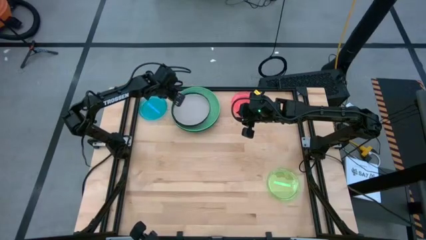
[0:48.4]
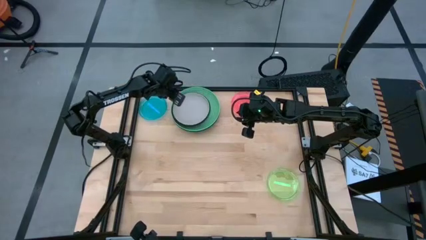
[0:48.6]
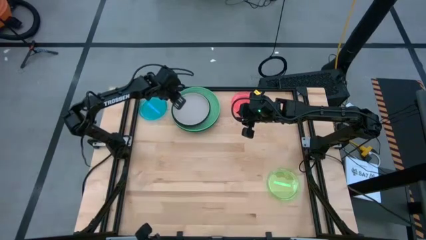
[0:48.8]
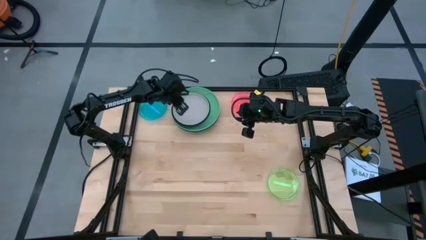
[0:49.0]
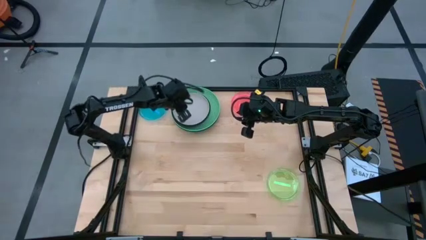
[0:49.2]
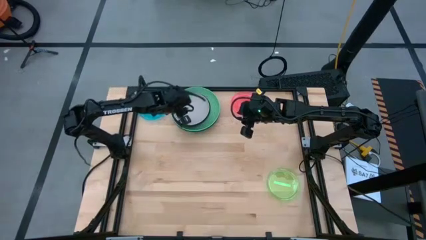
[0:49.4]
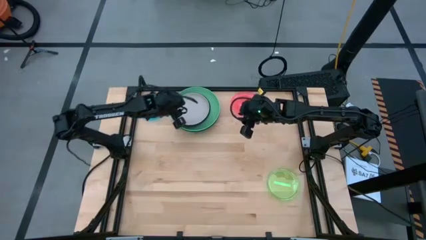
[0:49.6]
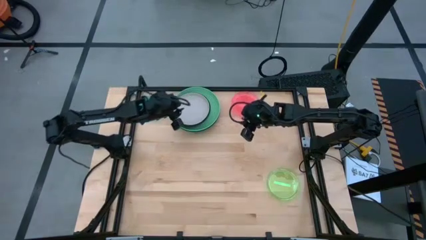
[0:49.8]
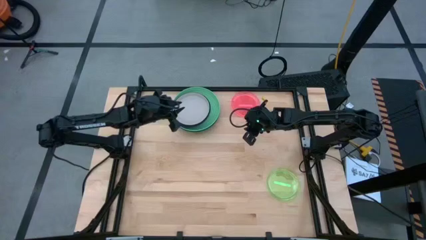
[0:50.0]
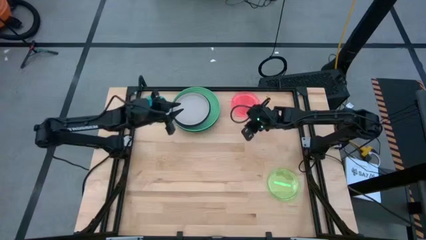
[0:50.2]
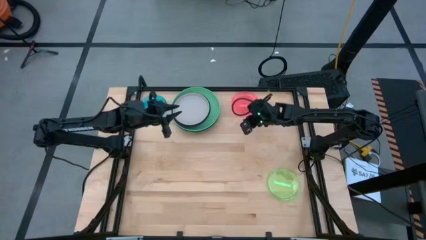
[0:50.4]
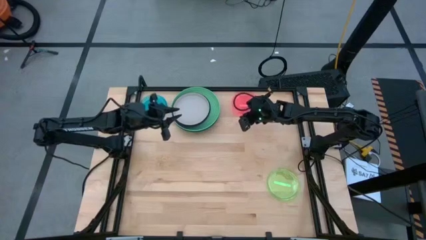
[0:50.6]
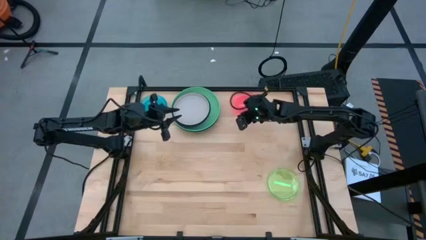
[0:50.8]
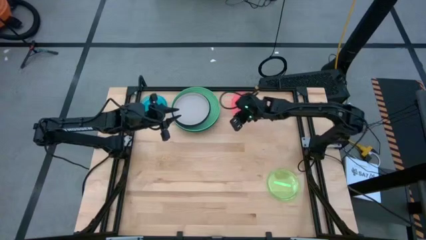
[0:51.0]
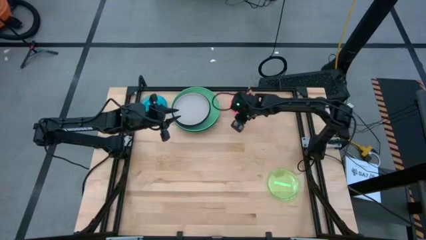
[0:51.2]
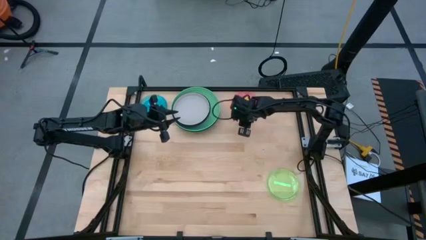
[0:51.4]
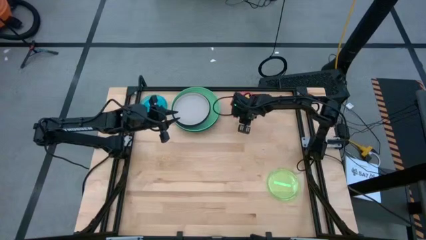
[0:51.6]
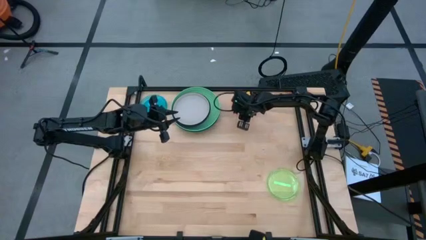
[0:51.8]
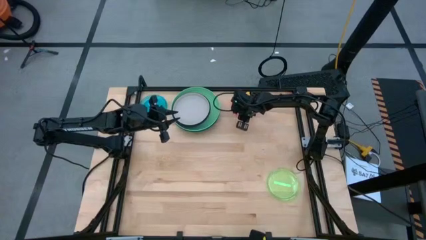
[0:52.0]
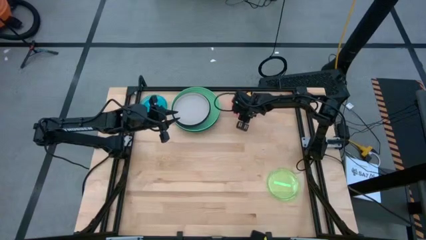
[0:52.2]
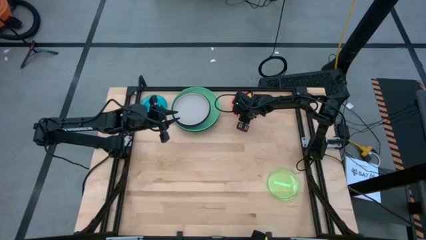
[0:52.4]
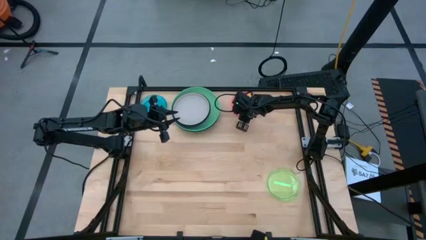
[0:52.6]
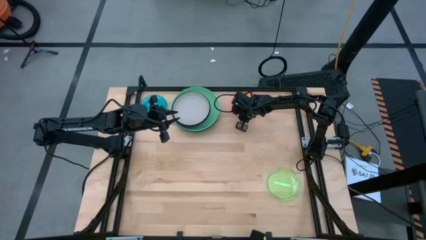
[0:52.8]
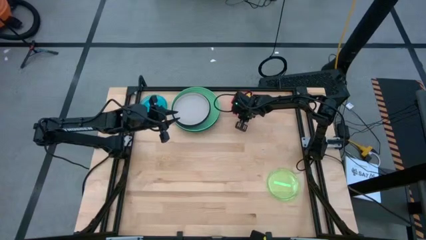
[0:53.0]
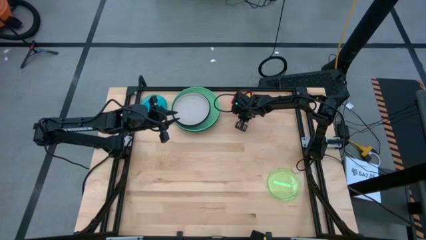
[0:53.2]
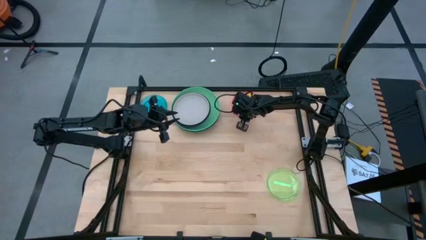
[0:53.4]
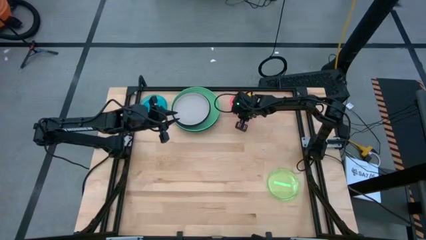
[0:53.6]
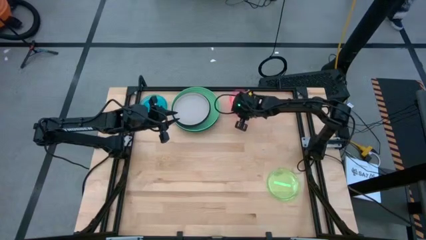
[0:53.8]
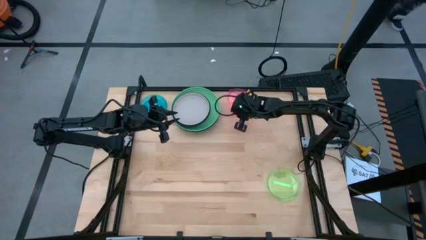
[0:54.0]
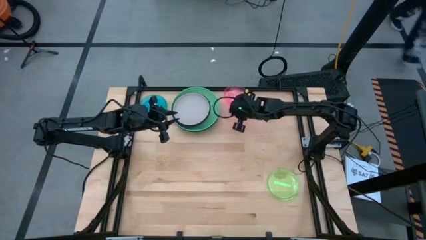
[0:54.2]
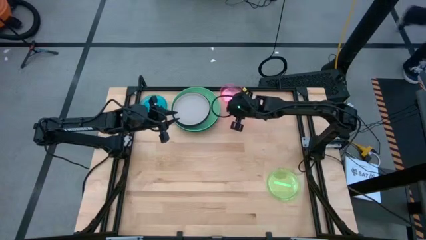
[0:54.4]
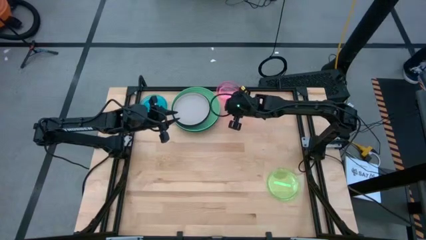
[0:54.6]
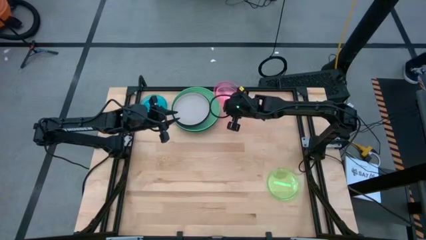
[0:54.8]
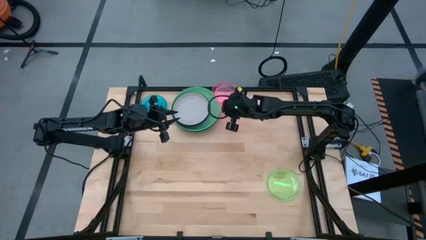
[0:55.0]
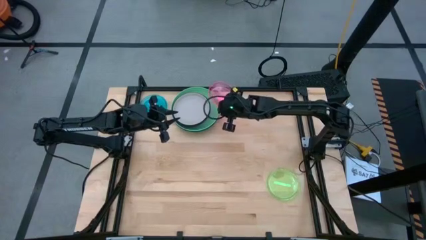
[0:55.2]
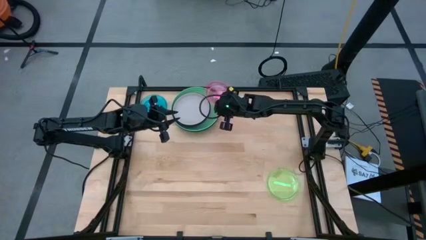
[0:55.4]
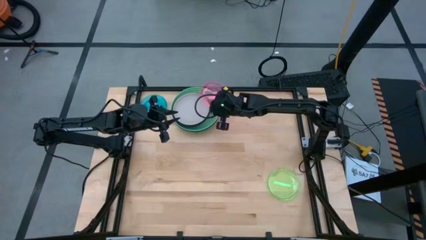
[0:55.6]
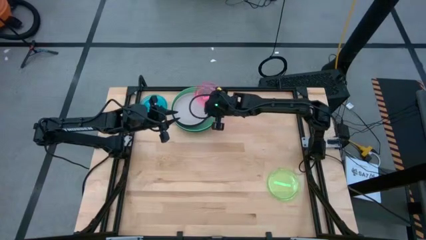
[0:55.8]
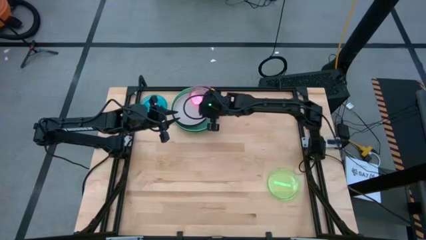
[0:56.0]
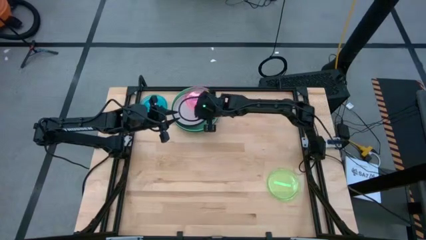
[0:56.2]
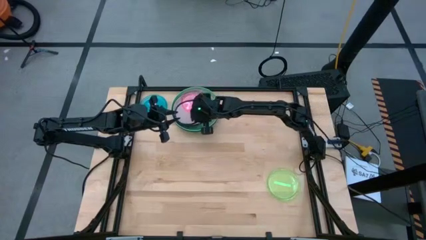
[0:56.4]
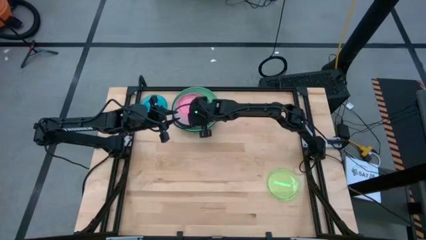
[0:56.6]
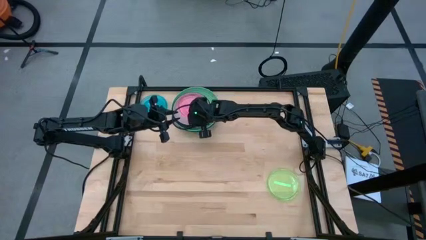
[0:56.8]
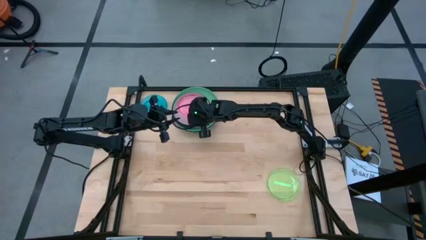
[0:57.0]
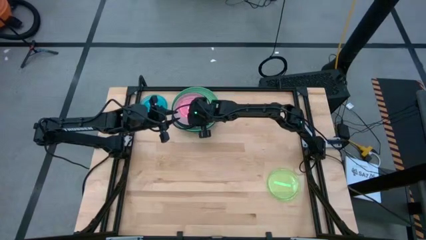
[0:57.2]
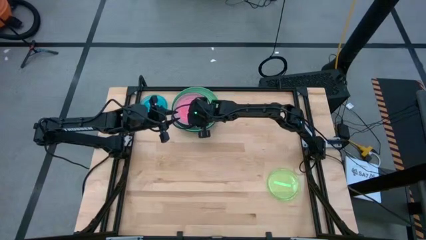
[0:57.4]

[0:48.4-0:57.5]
Task: Stack plastic plates
Stack the transparent pink plate on the gray plate

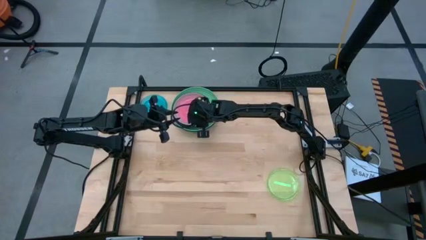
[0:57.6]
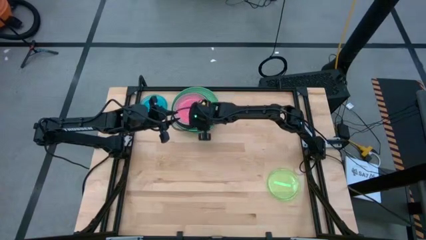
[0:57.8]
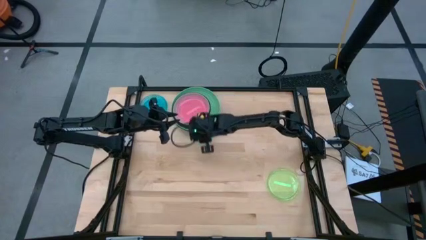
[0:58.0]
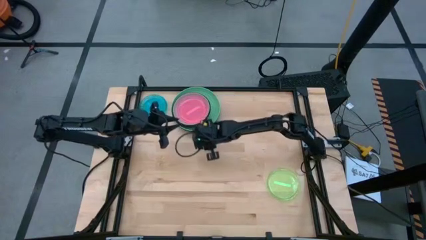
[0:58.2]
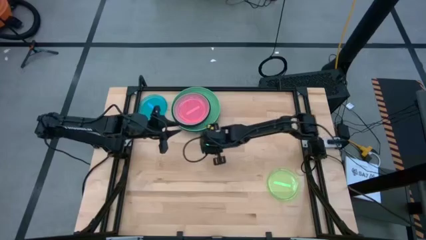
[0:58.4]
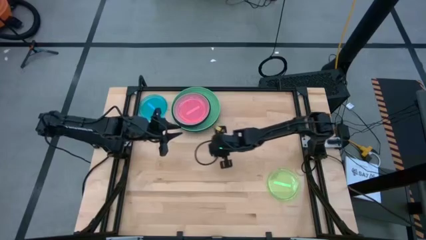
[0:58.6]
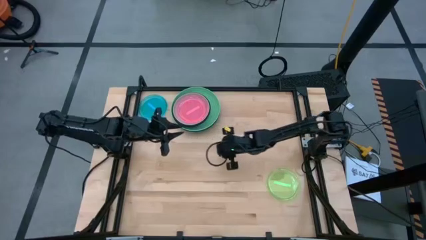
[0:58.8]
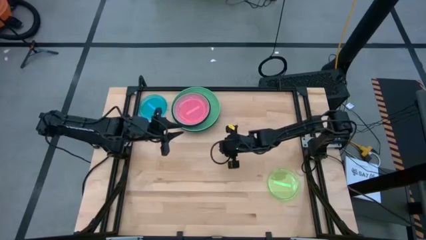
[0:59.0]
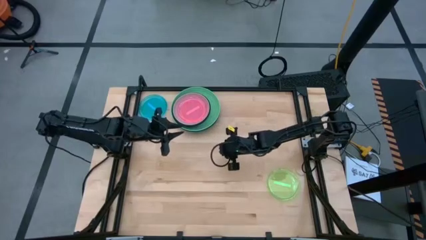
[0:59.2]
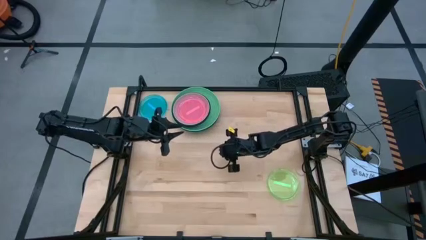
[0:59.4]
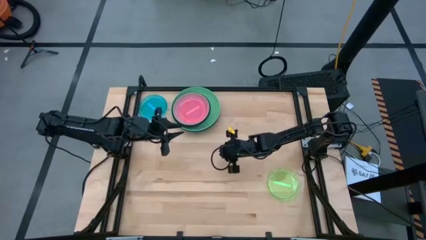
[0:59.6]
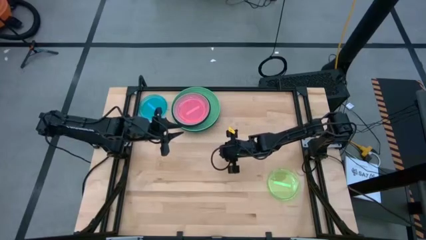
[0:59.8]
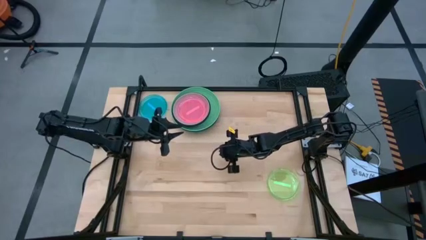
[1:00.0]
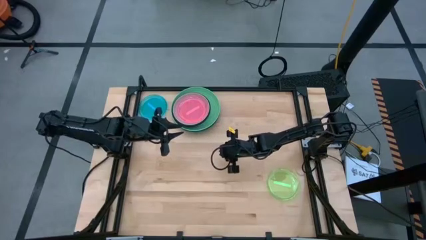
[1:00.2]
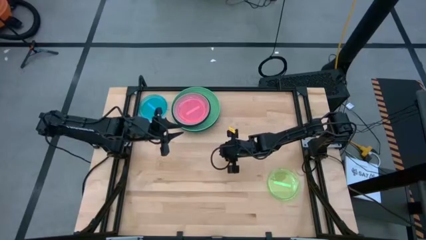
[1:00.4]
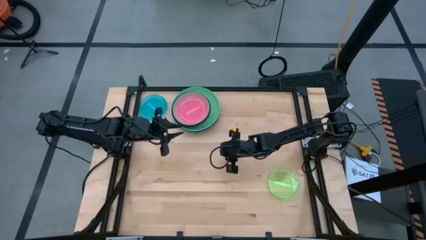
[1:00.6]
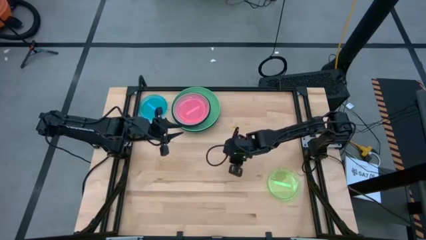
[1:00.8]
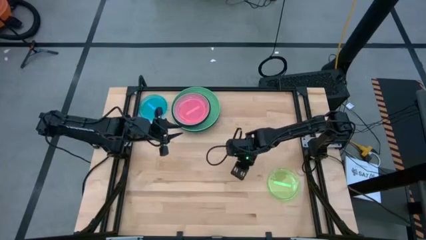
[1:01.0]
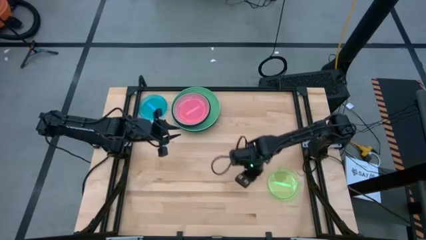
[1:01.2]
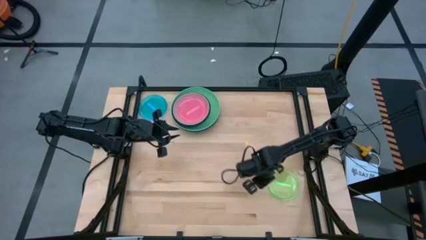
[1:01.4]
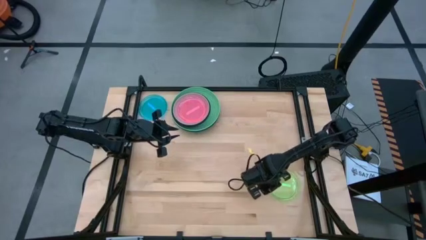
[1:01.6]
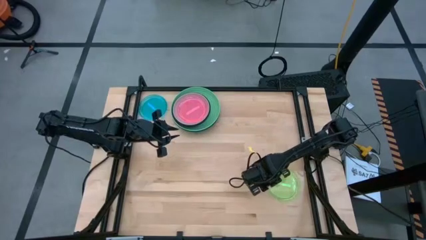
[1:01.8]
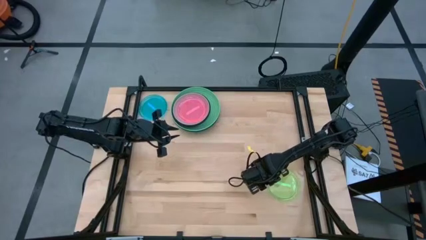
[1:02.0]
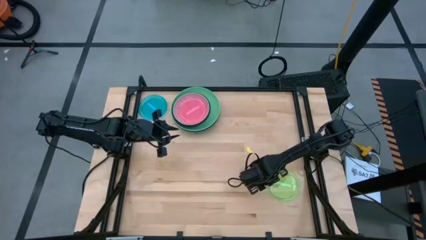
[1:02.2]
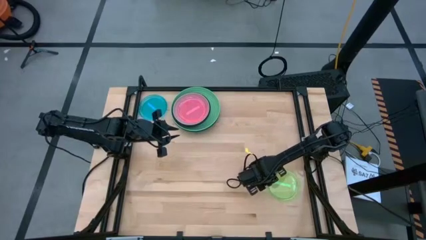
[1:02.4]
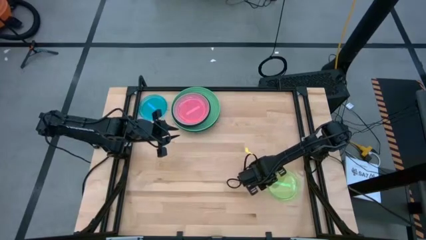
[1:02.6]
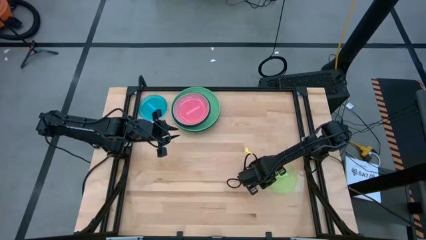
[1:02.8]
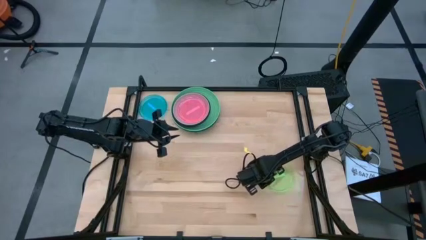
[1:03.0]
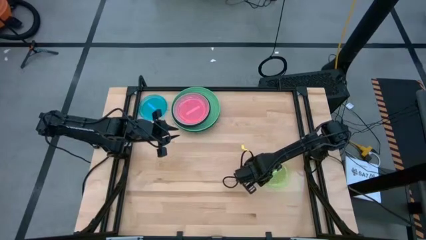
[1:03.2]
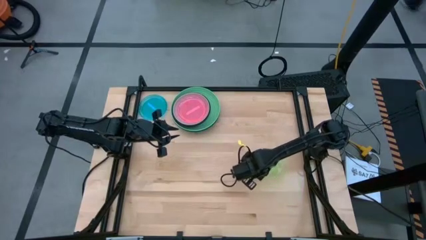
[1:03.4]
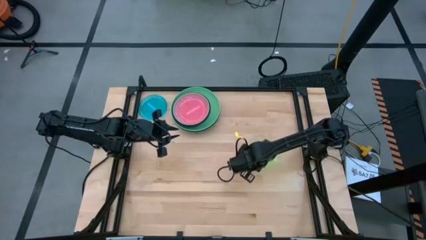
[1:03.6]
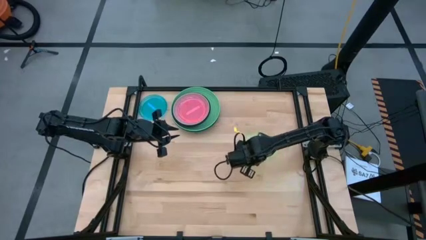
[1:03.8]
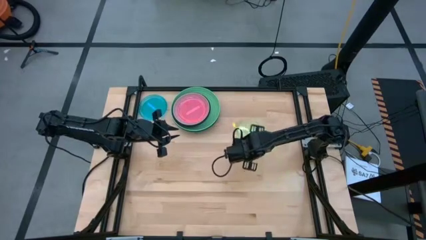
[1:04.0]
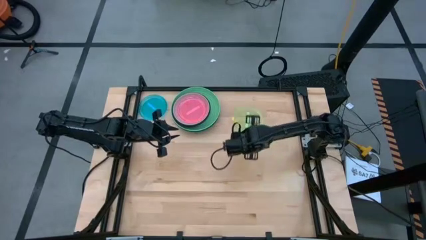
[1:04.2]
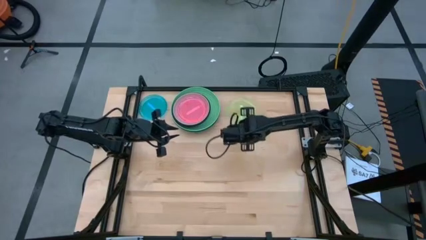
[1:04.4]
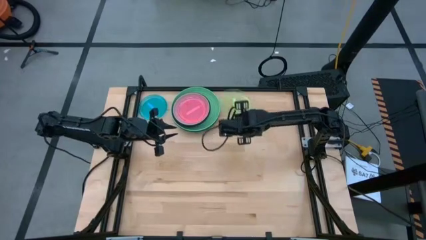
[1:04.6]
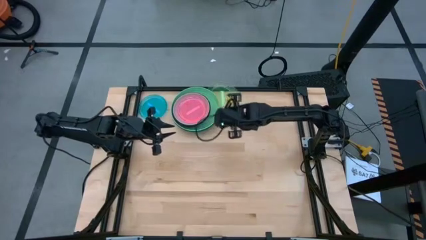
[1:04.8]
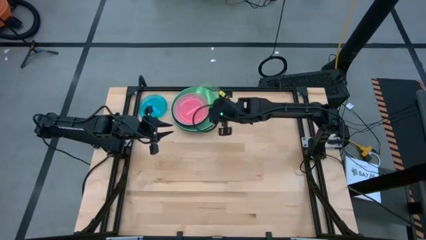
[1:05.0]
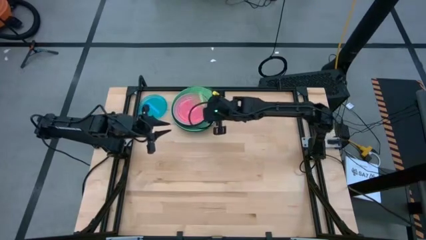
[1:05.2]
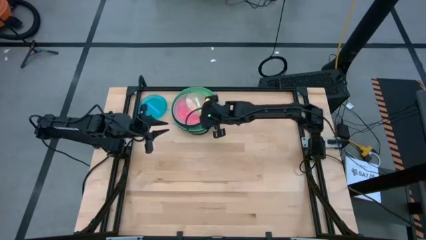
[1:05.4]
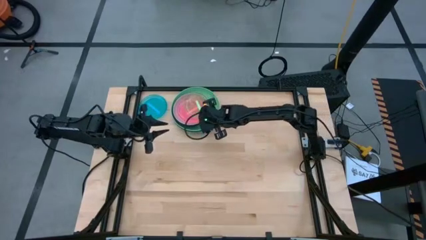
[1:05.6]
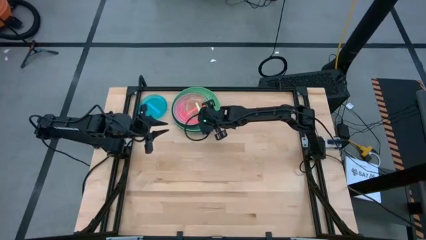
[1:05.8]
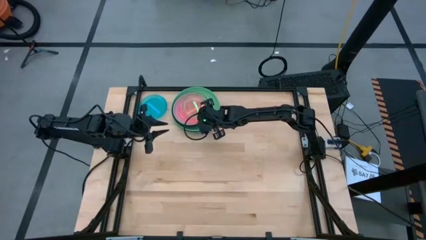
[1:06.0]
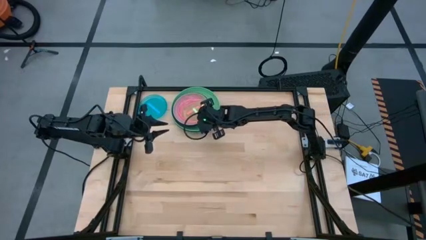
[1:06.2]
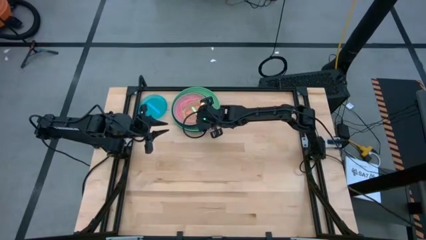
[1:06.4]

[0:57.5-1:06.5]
Stack the transparent green plate on the transparent pink plate
